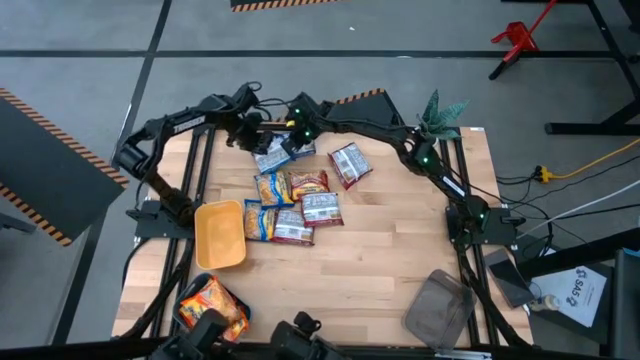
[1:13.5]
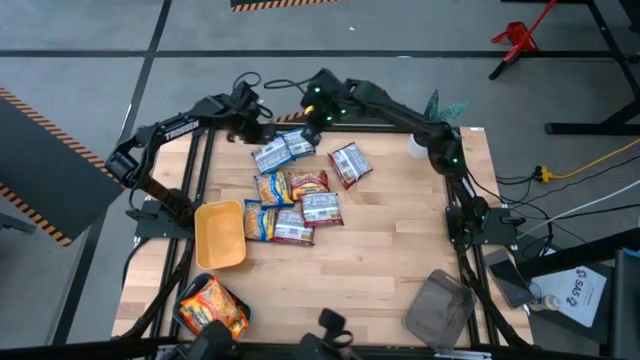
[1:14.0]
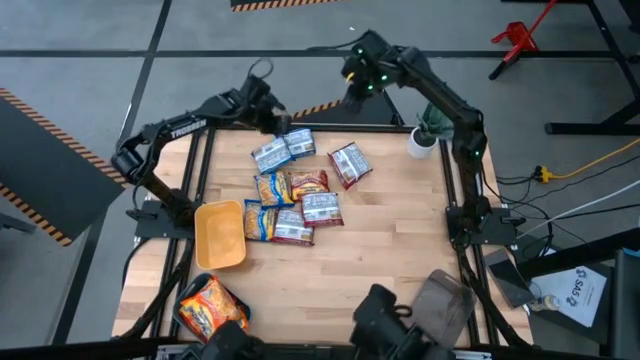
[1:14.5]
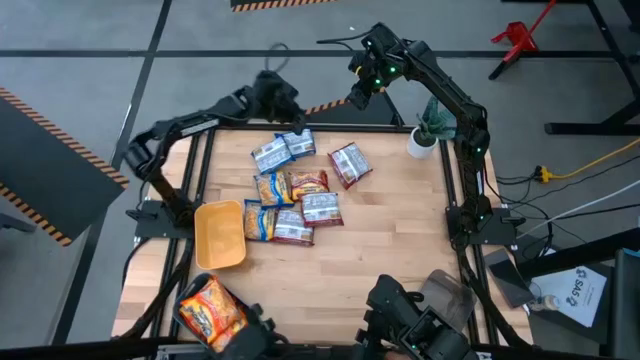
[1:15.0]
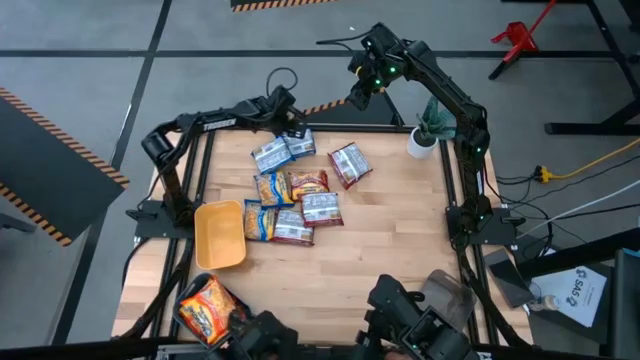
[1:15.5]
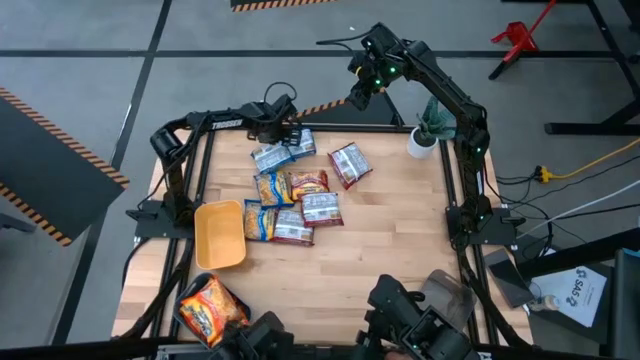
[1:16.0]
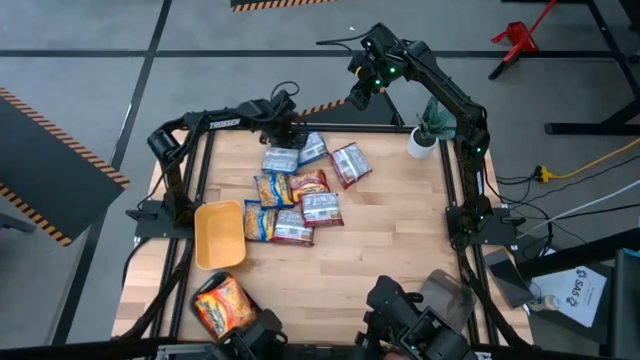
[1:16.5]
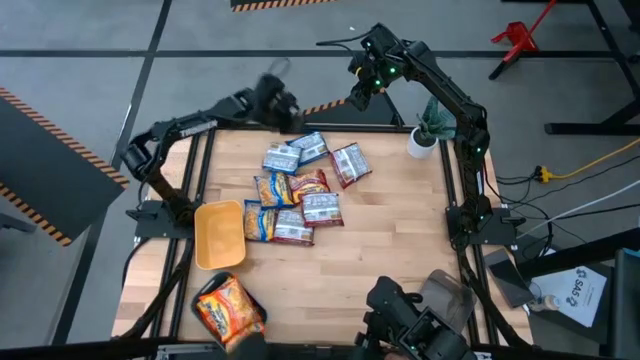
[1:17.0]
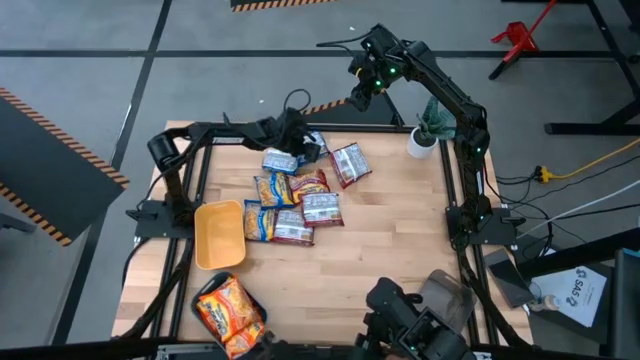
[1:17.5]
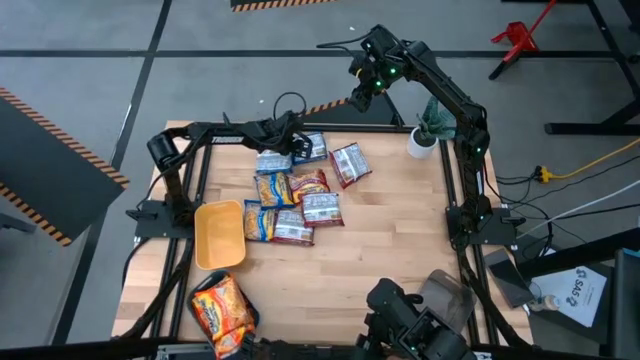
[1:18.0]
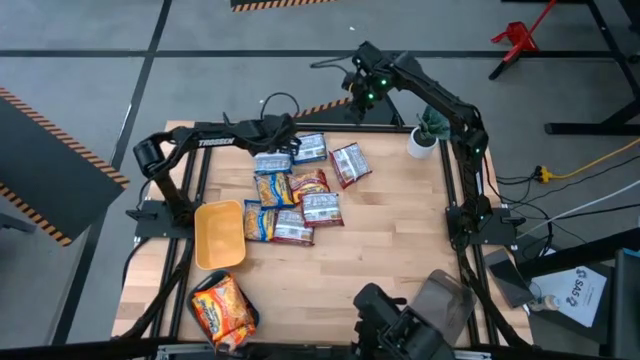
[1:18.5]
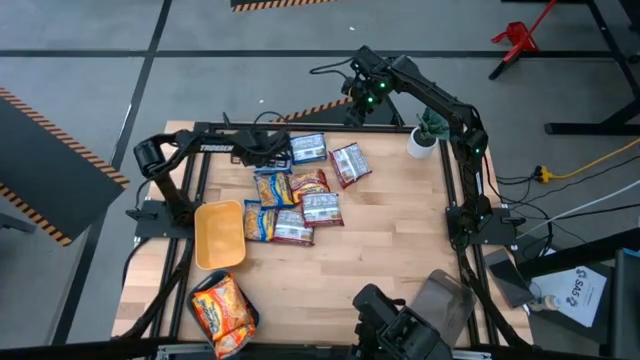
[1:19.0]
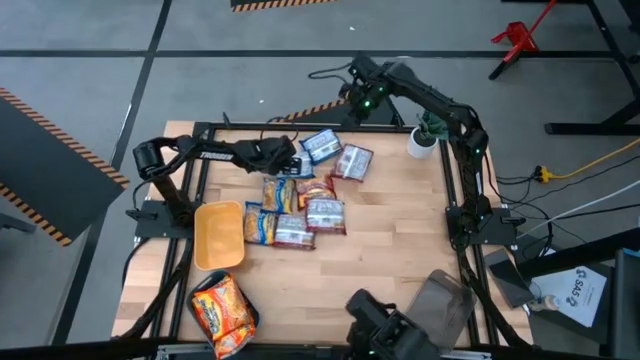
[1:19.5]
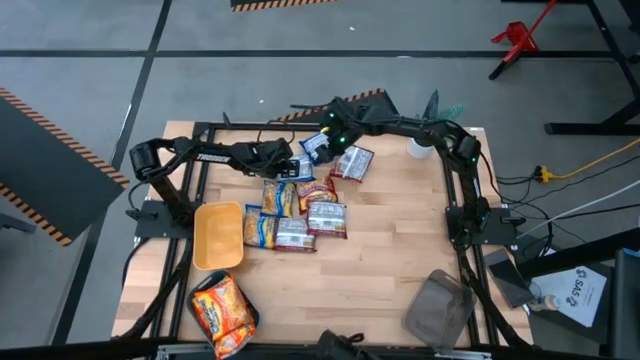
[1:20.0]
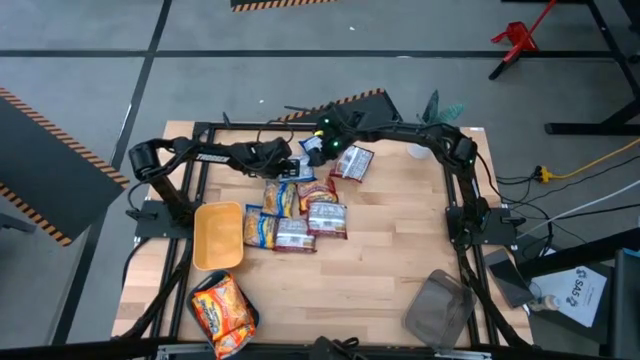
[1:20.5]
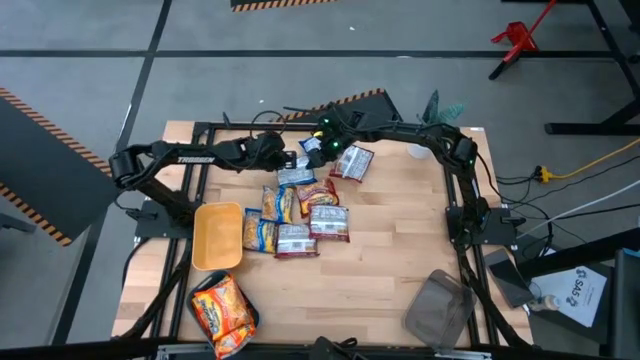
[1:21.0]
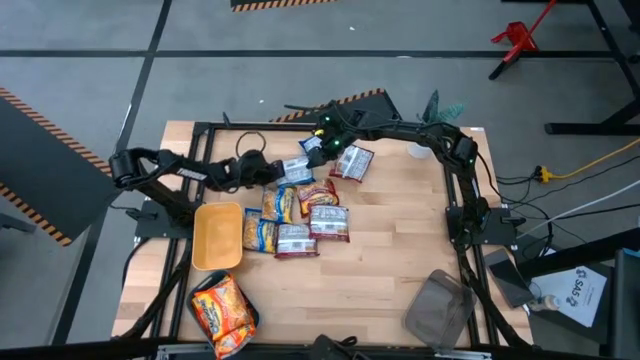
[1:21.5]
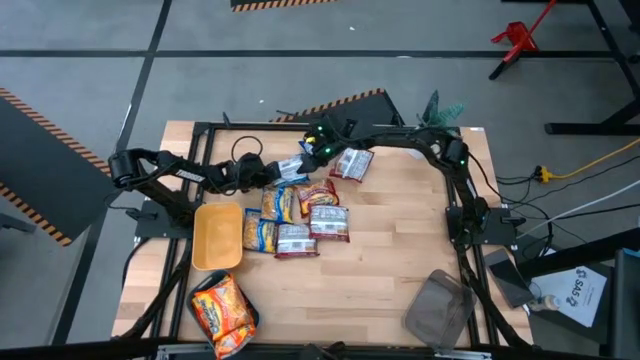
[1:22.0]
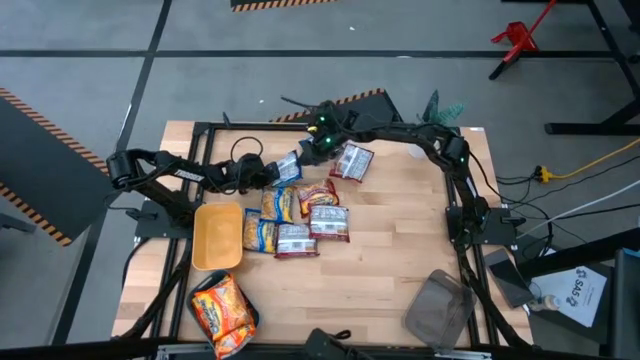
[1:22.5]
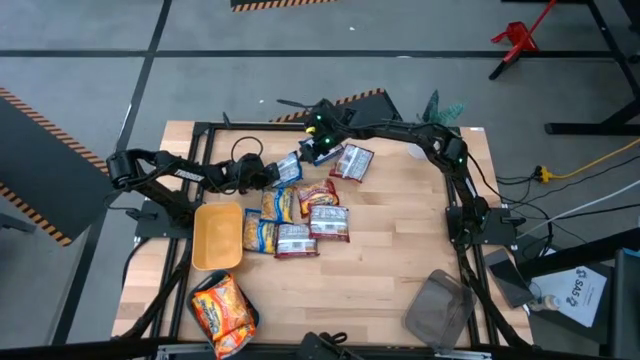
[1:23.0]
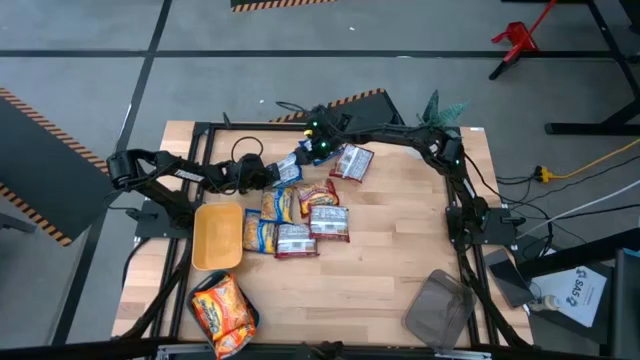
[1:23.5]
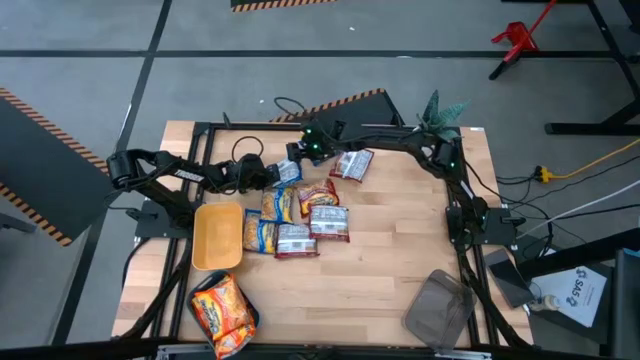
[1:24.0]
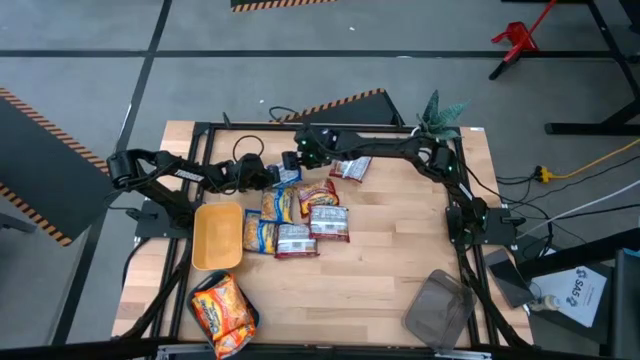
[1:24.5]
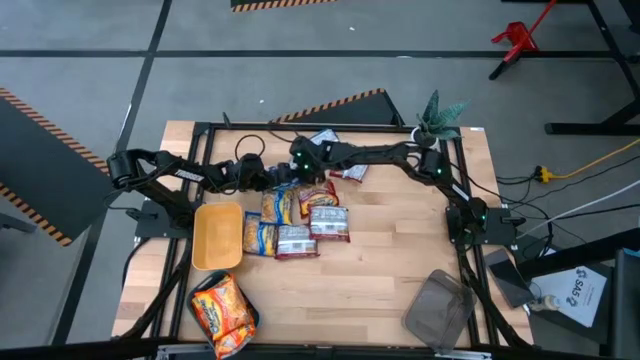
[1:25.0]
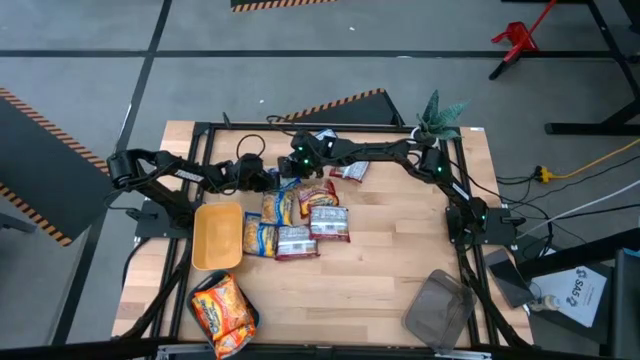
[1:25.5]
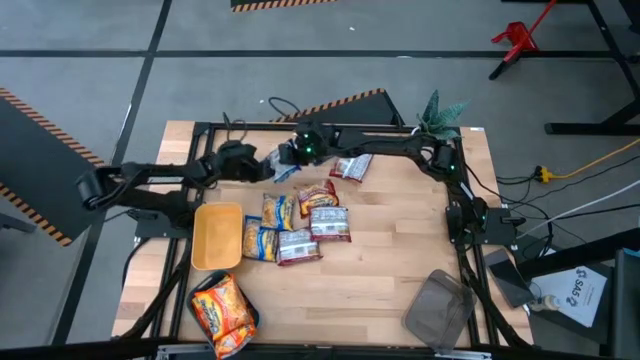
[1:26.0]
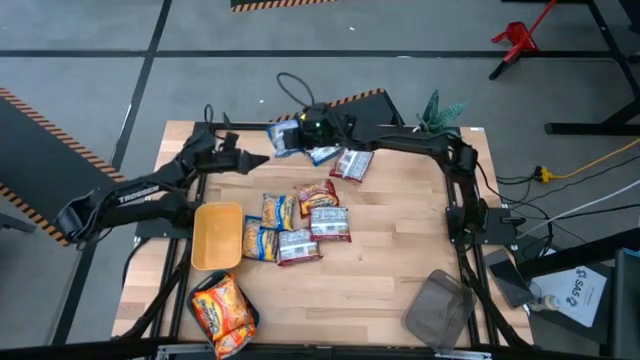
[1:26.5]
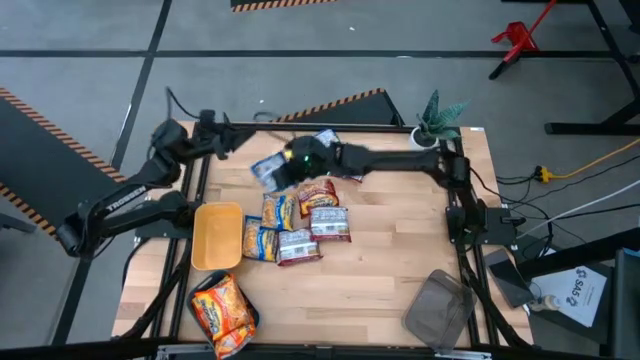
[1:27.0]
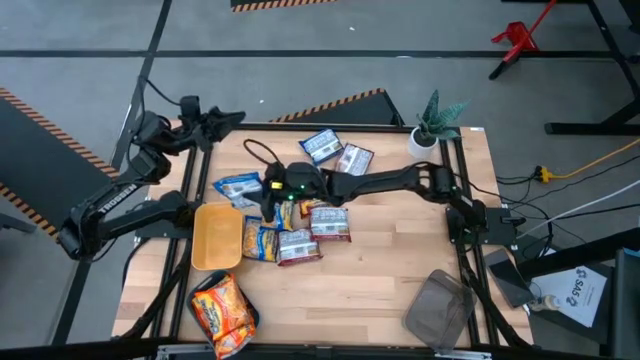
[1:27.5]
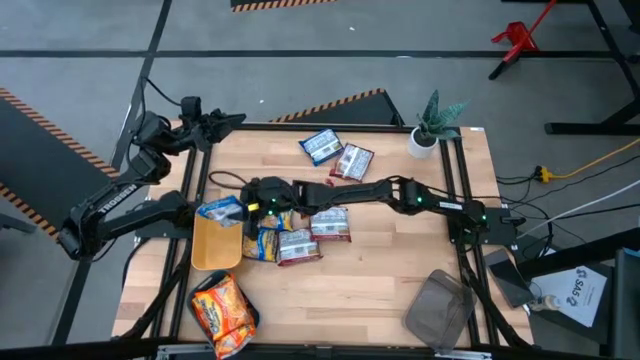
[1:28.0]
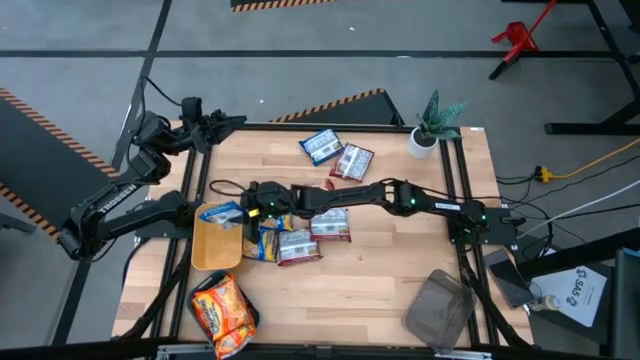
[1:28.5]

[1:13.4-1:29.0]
Task: Sort Maruchan noodles
Put the blue noodle pack into the yellow bin

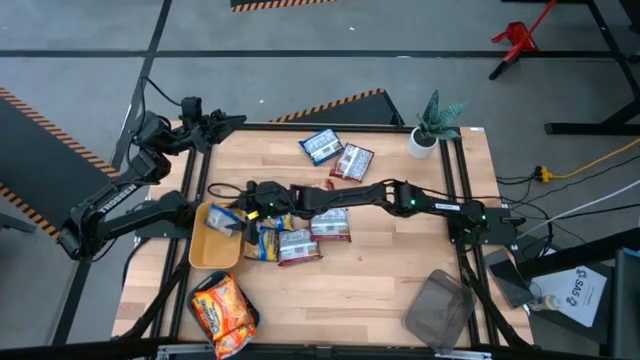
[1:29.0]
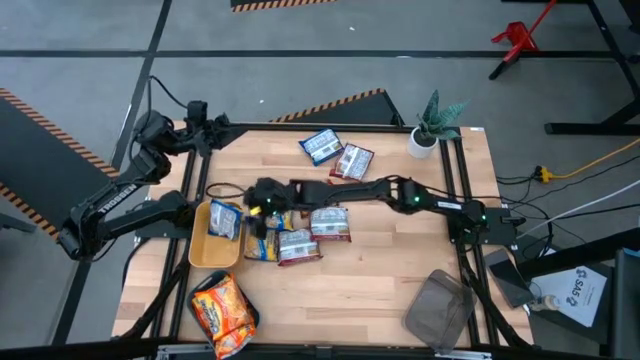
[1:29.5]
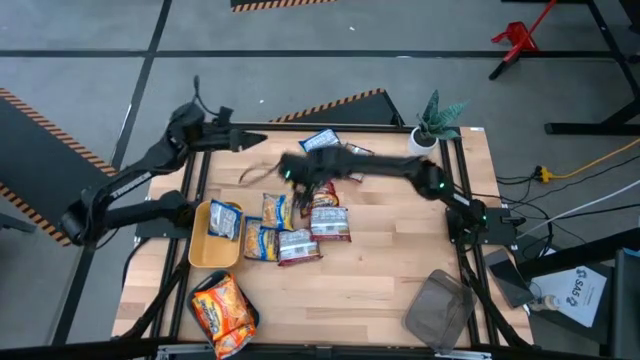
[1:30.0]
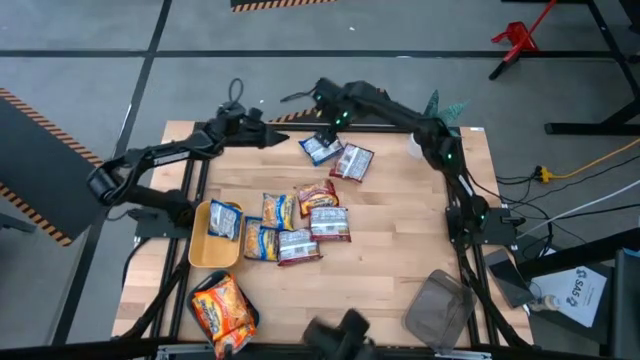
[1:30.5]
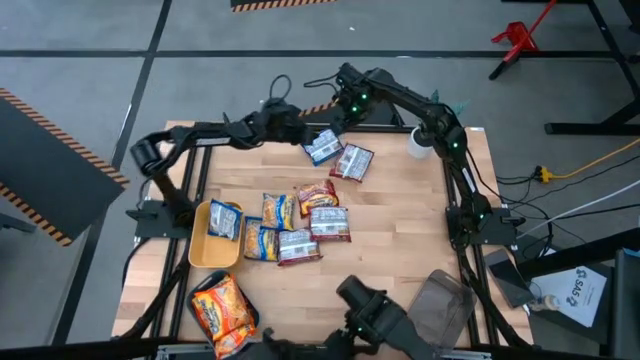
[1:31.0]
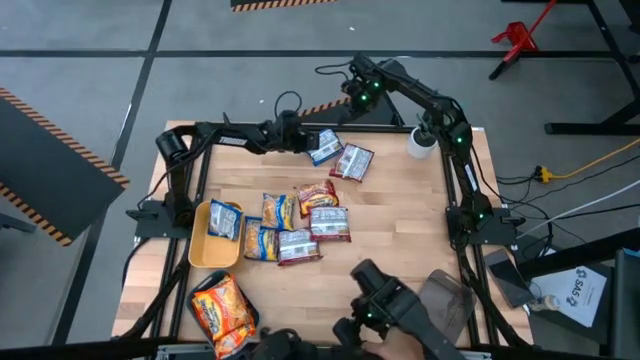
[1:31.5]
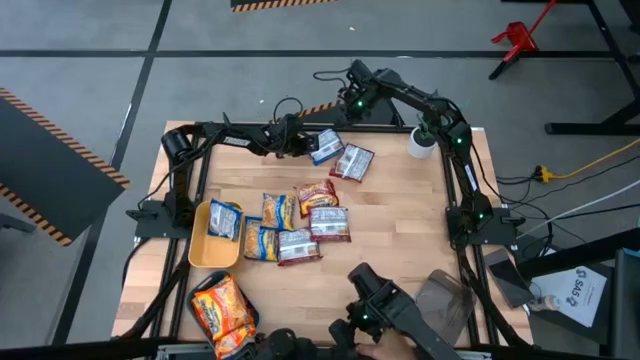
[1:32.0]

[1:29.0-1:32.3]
Put the blue noodle pack into the yellow bin

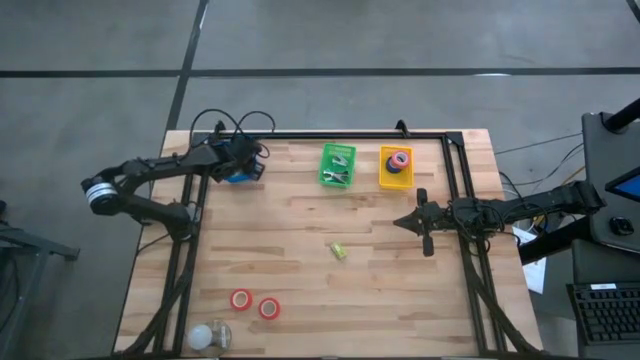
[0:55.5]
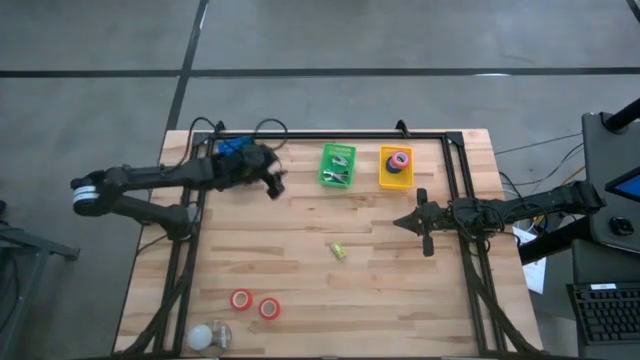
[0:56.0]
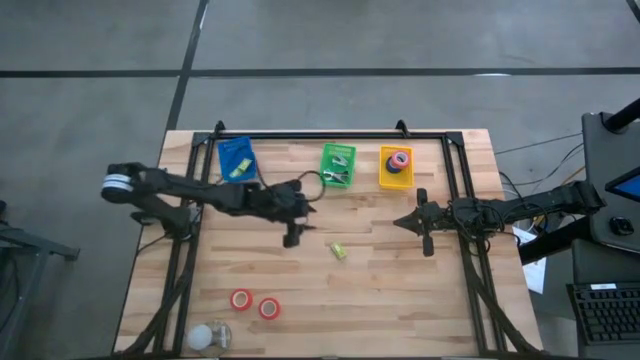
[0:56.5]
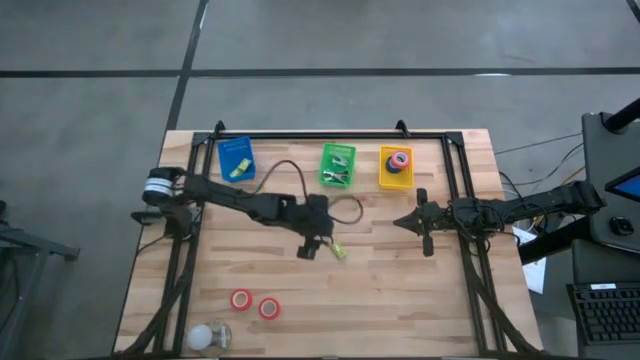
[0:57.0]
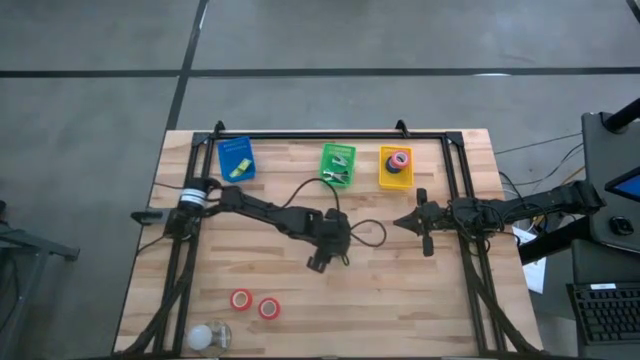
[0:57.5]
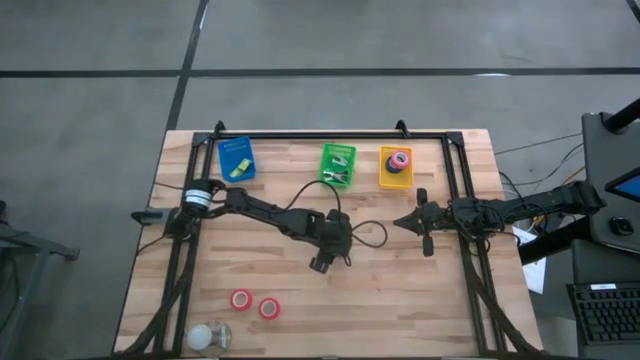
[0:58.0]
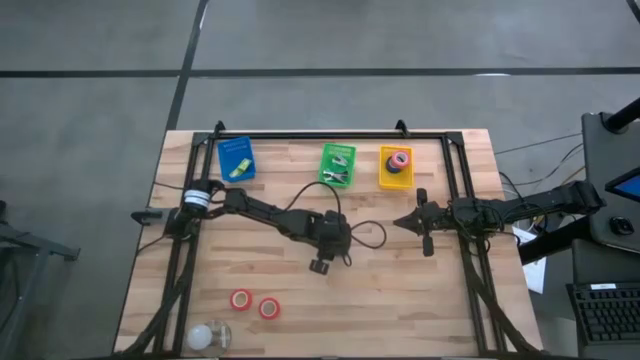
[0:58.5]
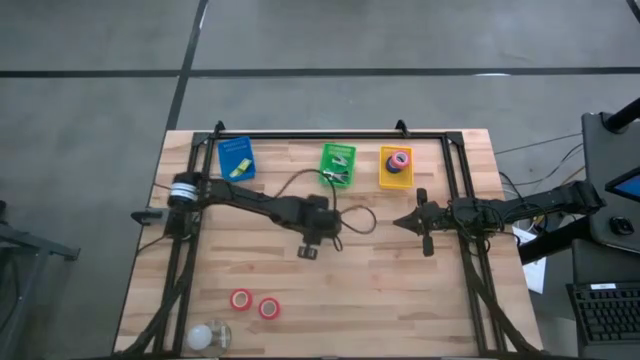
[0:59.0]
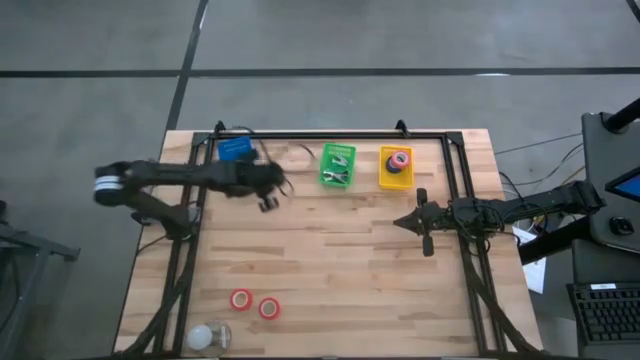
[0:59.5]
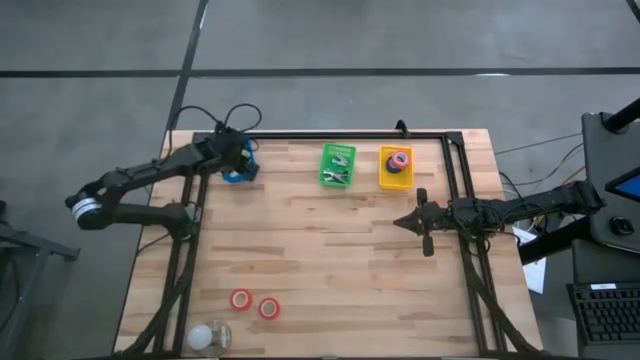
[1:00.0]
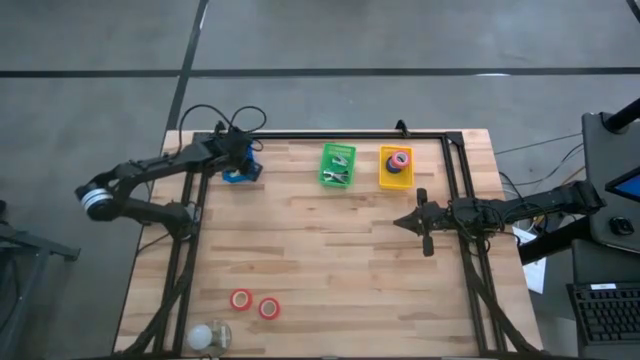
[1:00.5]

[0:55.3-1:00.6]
Task: Pick and place Stapler, Stapler remover, tape
Put the green stapler pin box into the blue basket
